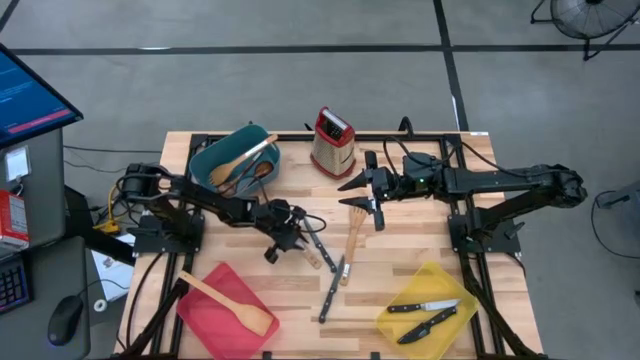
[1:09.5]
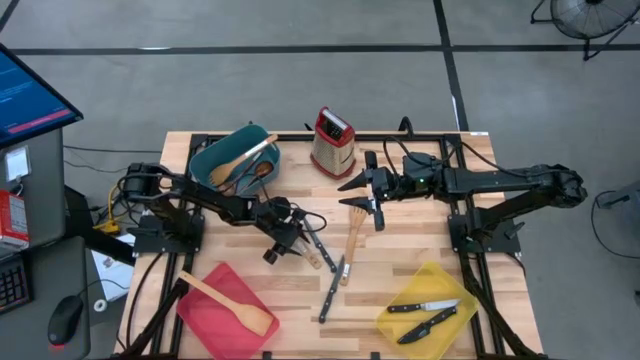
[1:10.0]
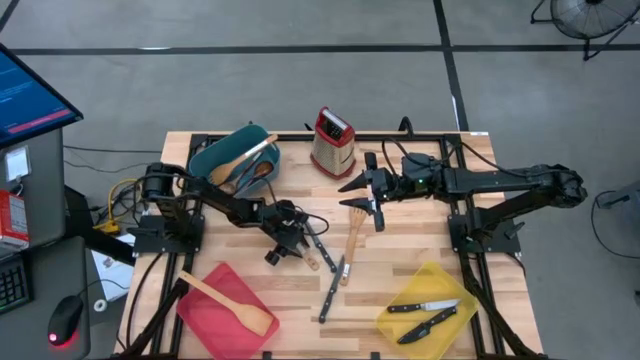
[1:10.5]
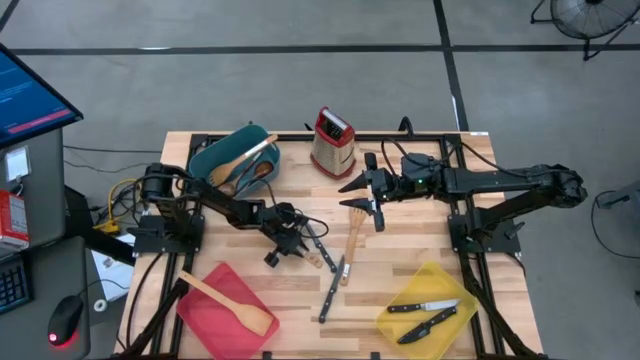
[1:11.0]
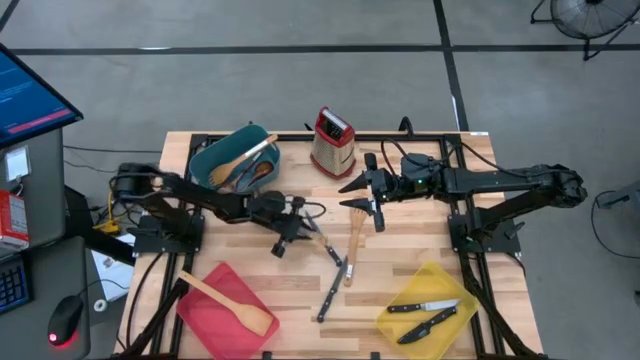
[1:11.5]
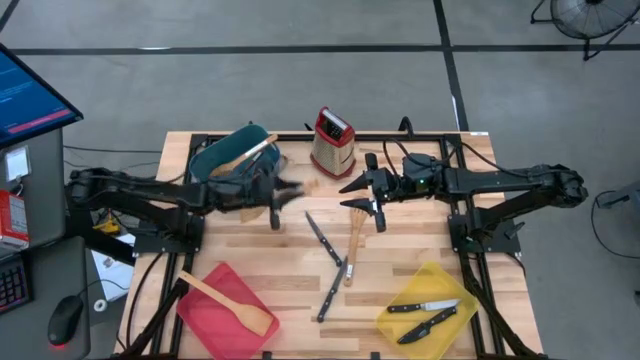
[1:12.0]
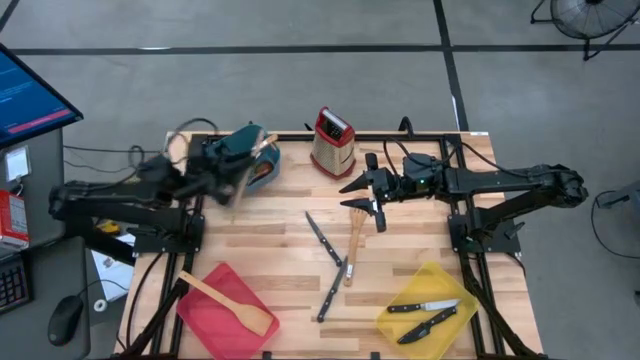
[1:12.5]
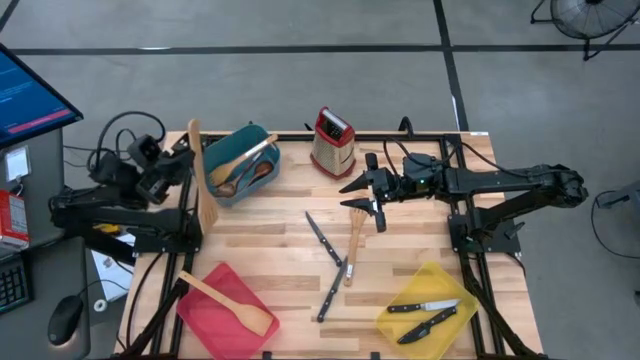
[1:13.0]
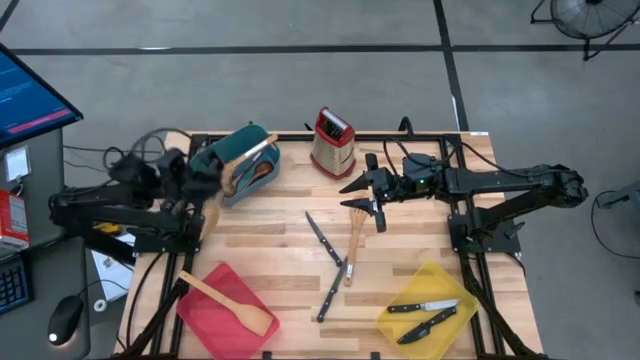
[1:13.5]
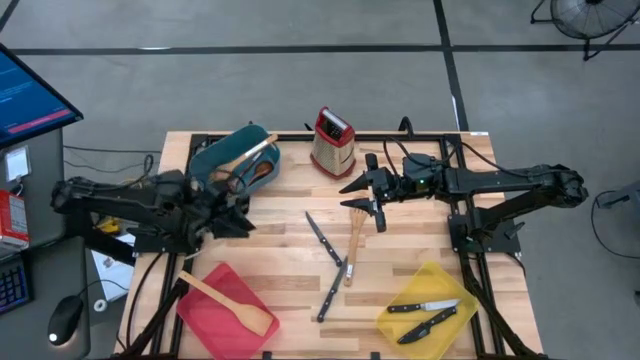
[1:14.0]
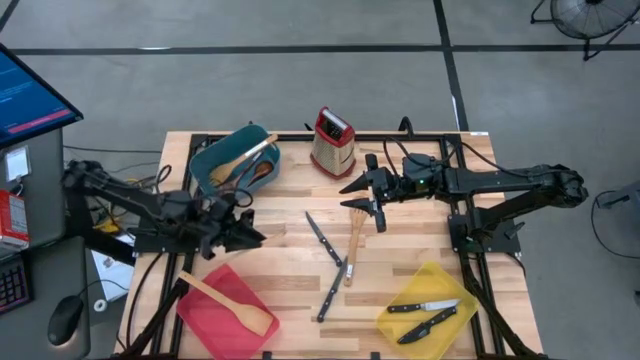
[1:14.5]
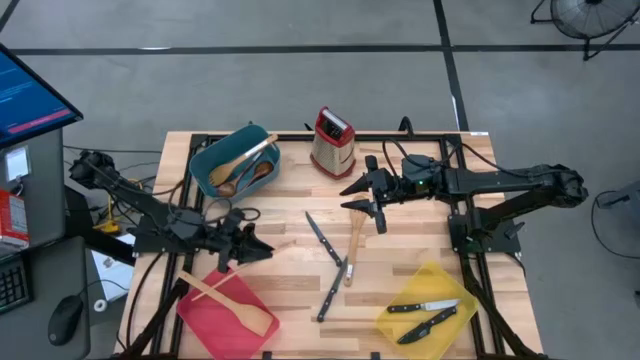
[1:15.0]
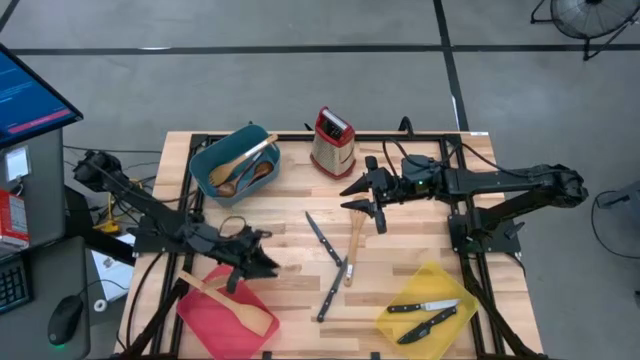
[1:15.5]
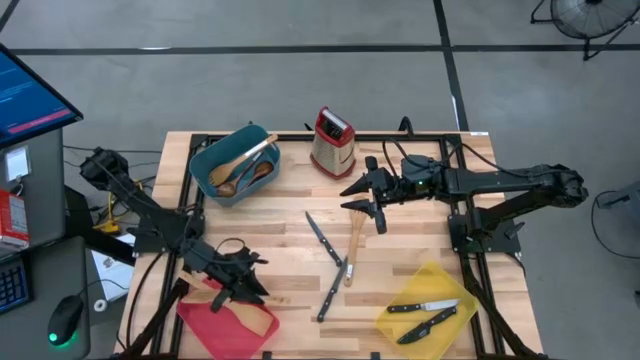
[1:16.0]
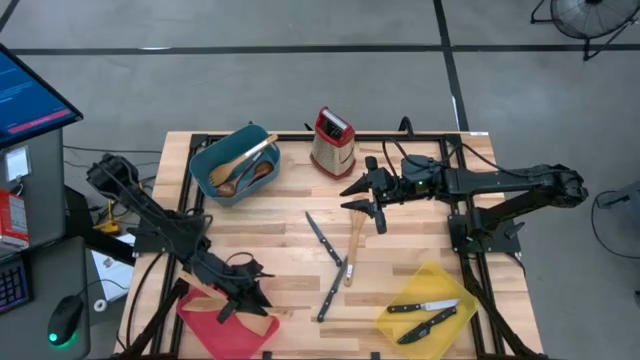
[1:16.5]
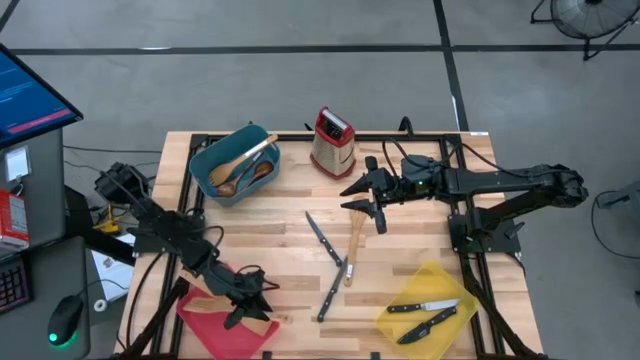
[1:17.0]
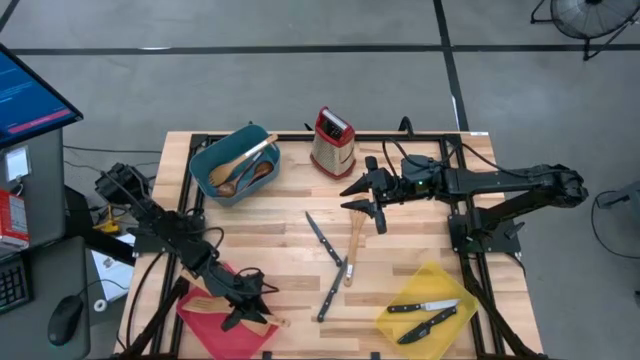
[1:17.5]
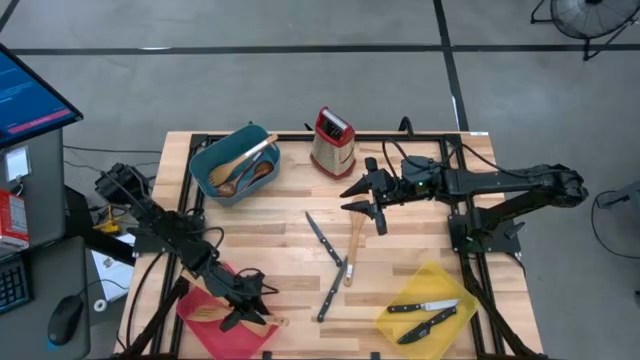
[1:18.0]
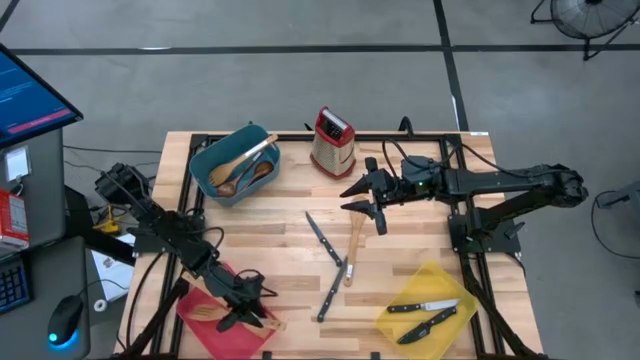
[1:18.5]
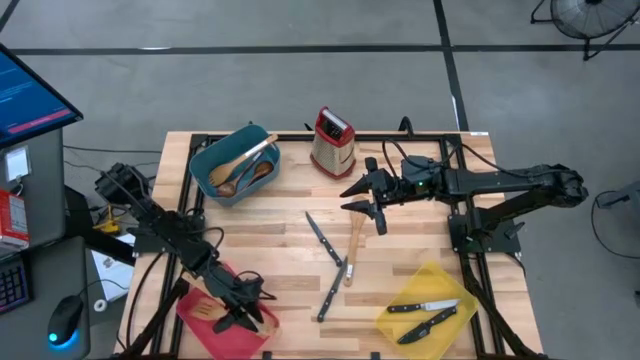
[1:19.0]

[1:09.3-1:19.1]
Task: Pick & Place Kitchen Items
Put the brown wooden spatula into the pink bin

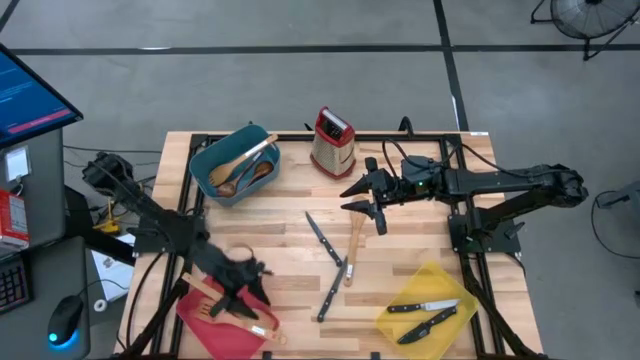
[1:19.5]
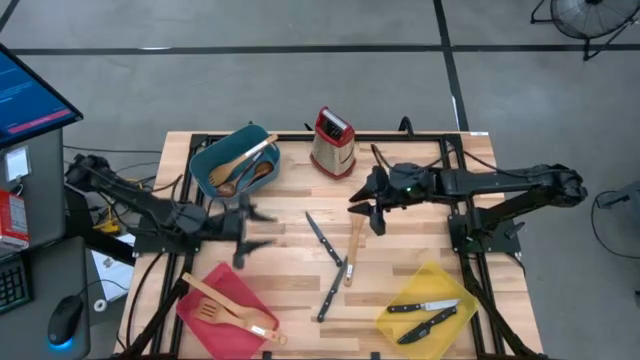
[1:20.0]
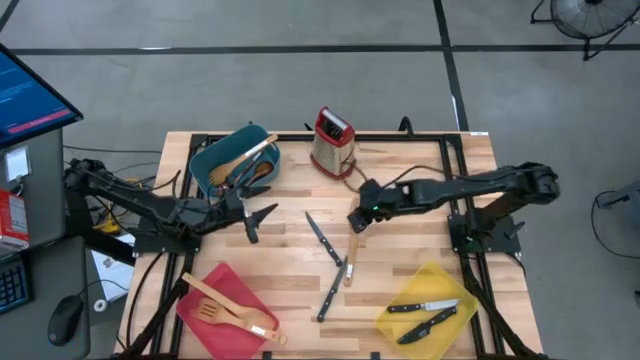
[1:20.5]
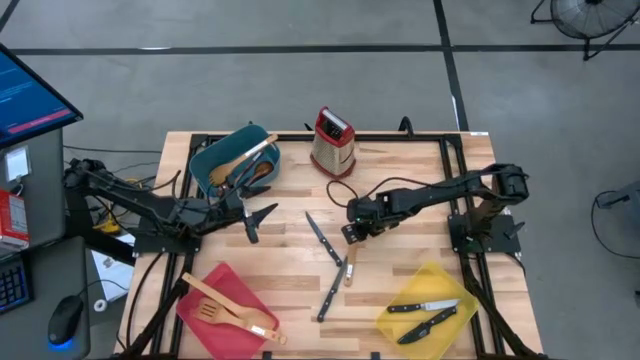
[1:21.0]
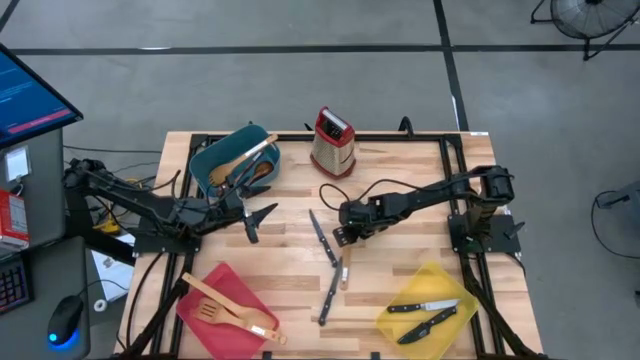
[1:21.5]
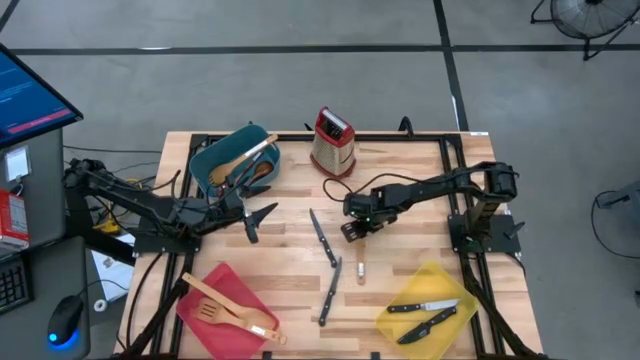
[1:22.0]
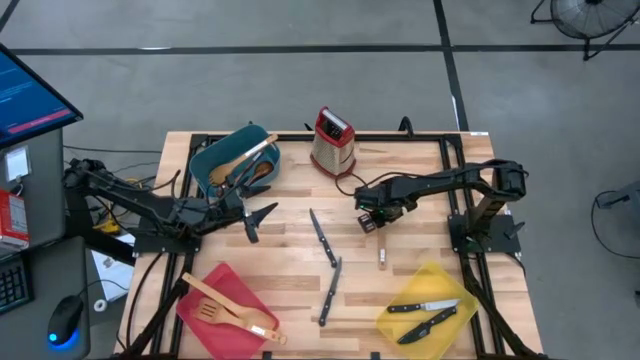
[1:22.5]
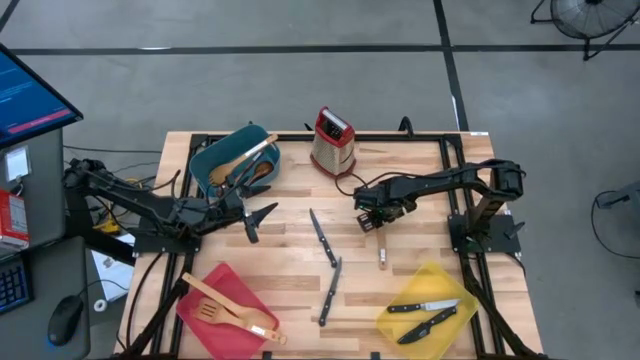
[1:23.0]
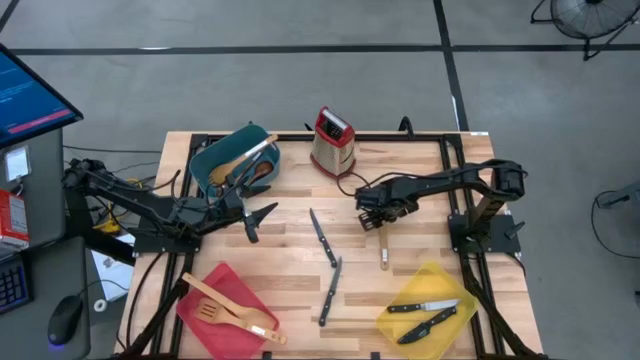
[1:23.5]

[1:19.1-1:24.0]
Put the brown wooden serving spoon into the blue bin

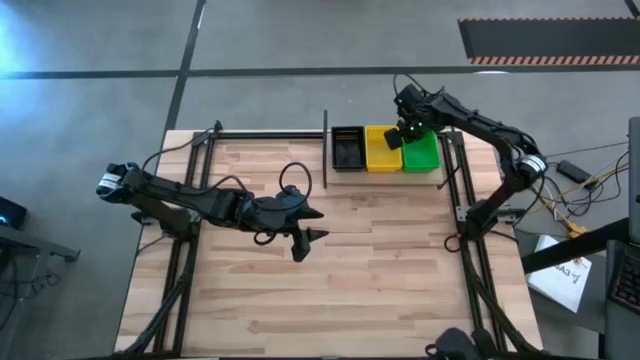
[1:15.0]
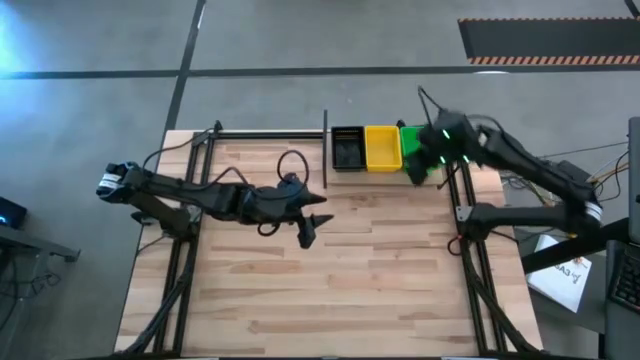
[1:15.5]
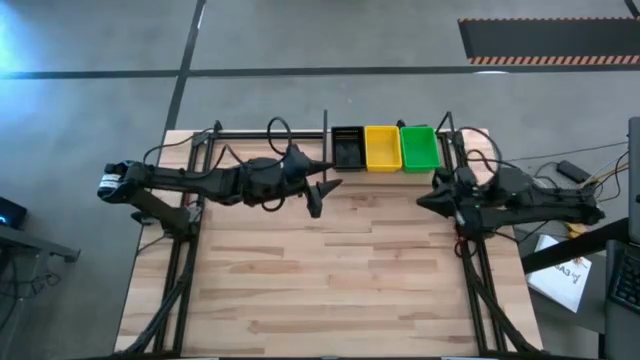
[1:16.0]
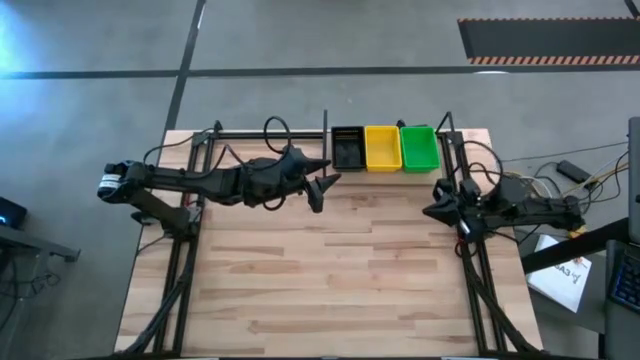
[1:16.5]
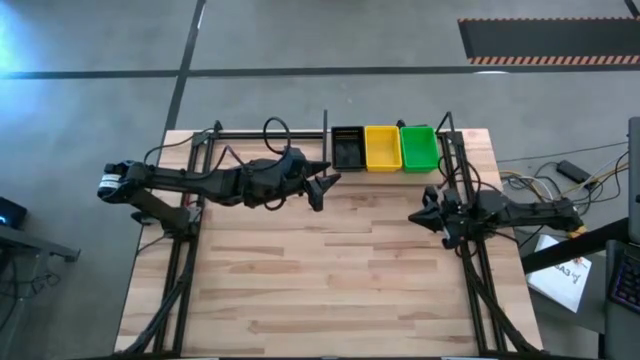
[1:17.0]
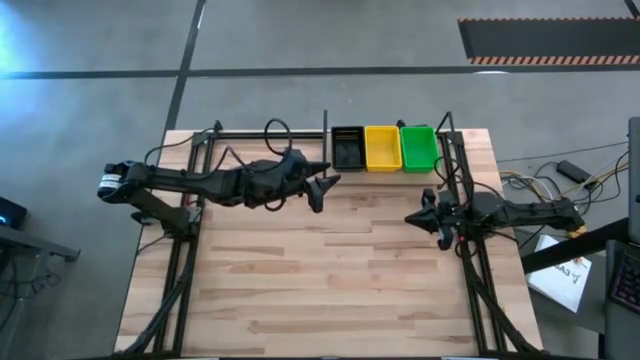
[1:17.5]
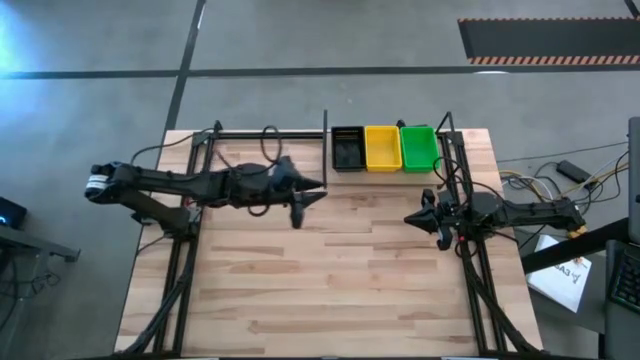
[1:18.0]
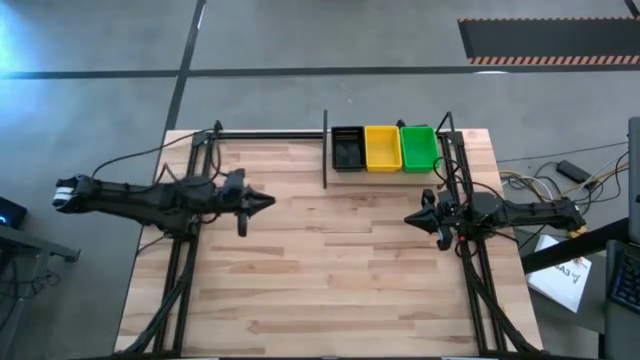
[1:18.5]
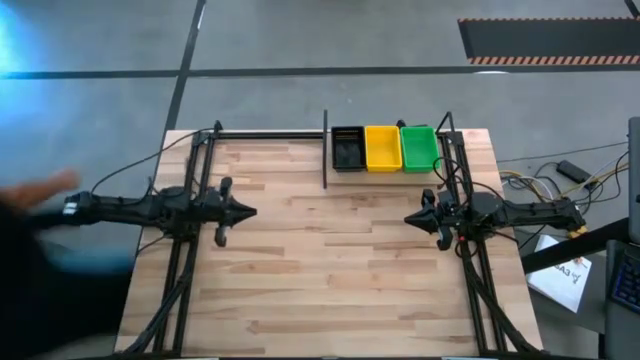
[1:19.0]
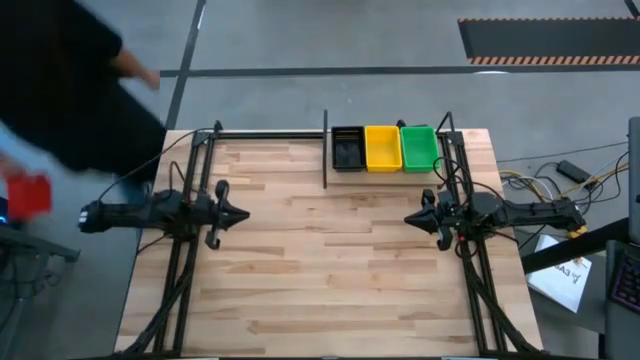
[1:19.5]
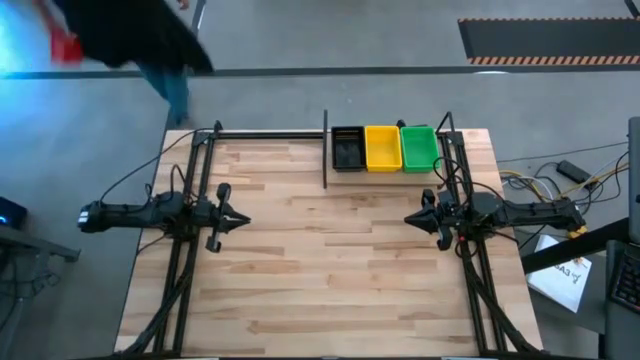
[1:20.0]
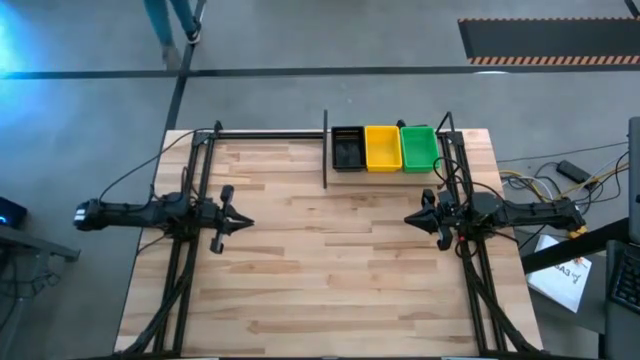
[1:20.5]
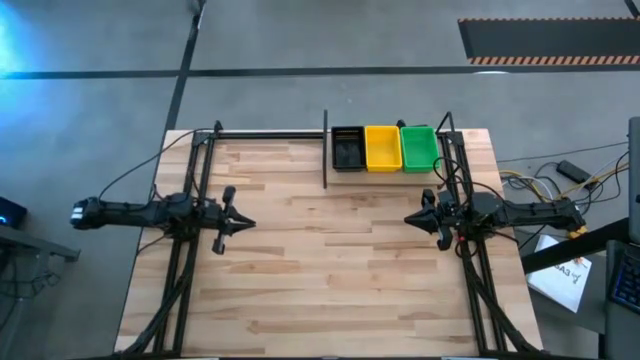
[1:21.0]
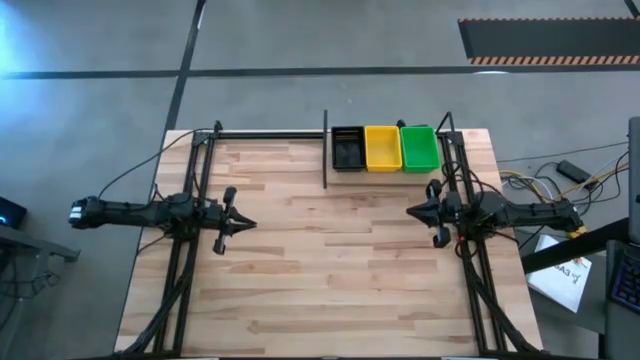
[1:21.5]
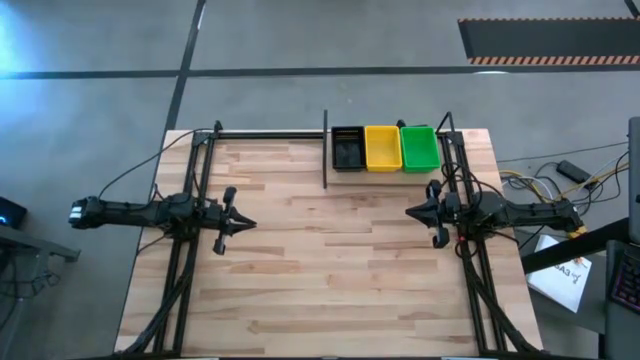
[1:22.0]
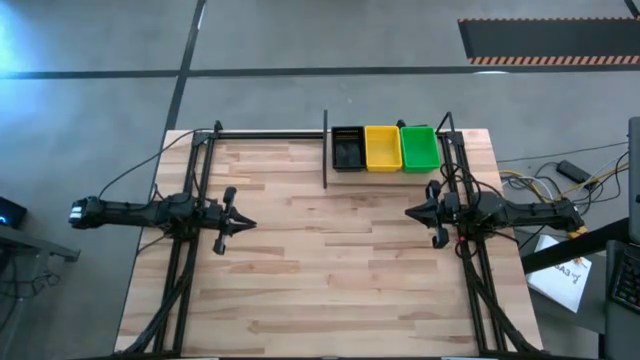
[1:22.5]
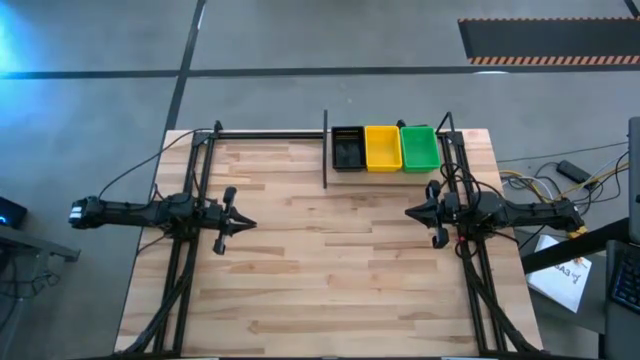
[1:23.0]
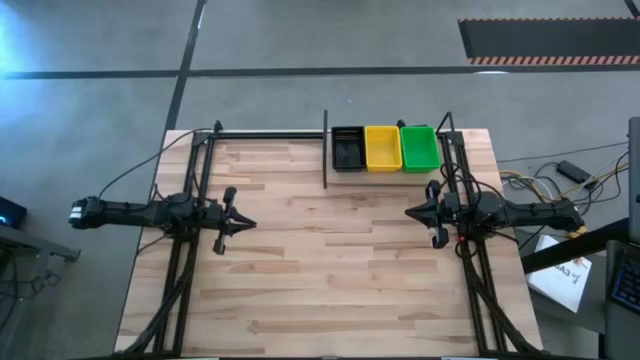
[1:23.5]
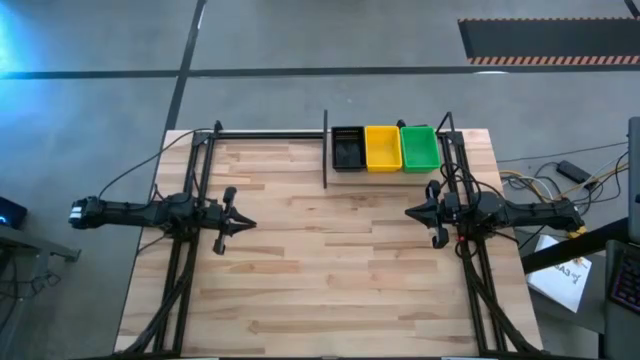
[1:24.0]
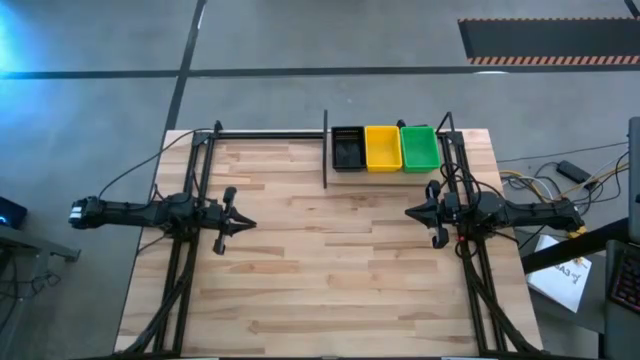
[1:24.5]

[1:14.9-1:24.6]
Task: Stack baskets on shelf by color
Return to Home Position
